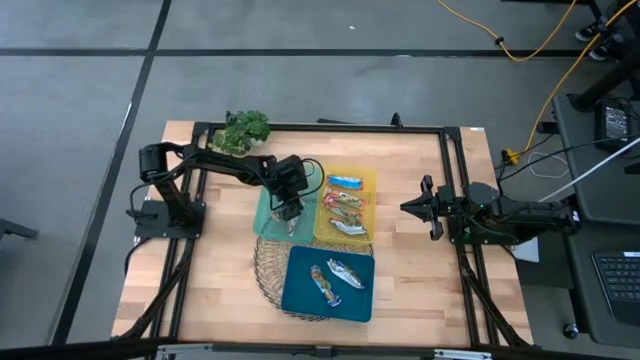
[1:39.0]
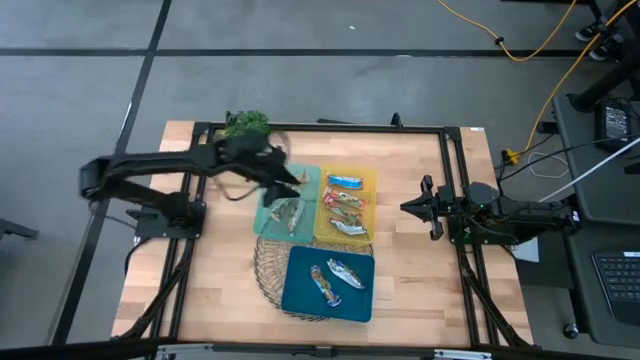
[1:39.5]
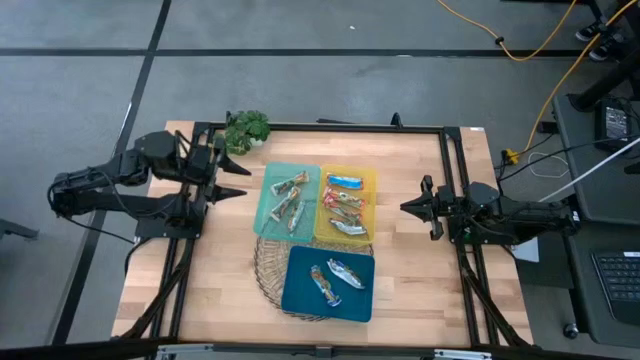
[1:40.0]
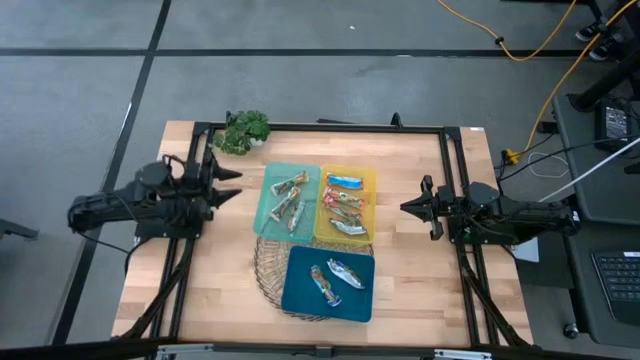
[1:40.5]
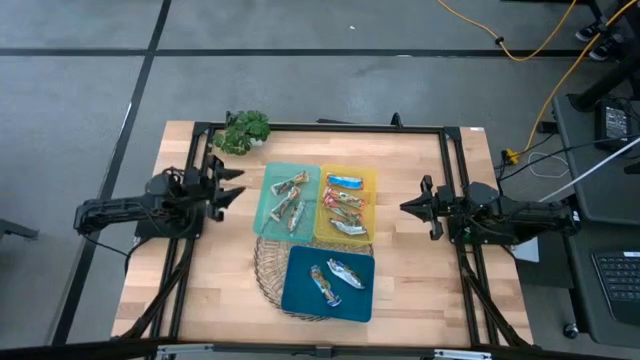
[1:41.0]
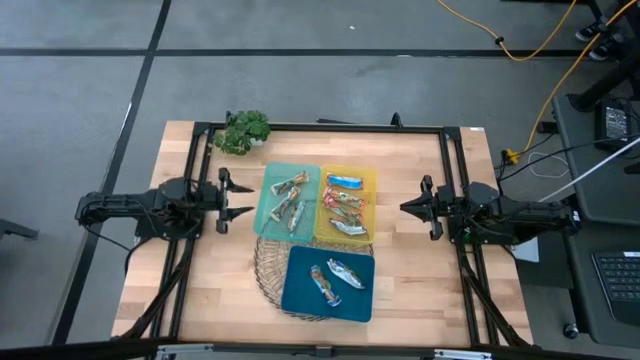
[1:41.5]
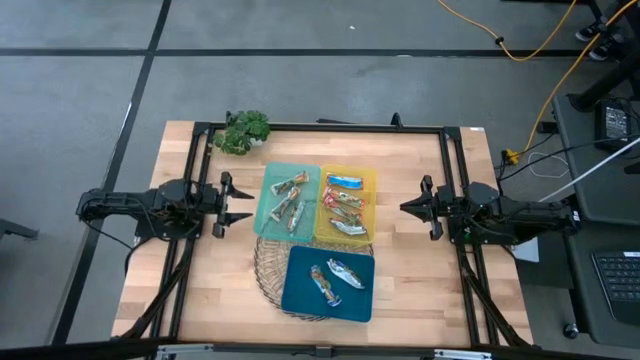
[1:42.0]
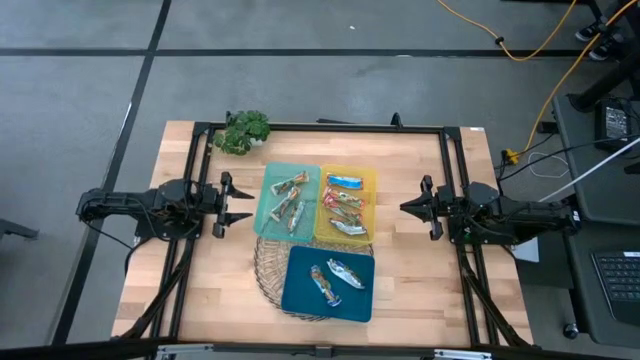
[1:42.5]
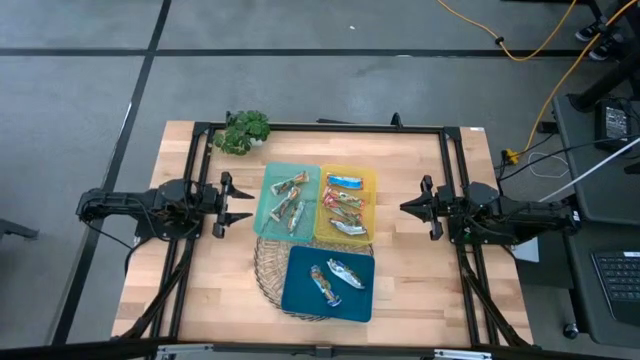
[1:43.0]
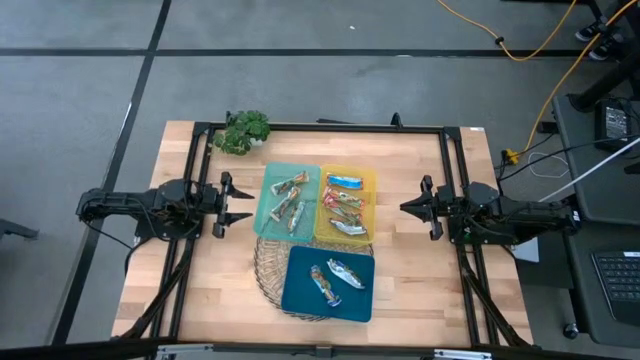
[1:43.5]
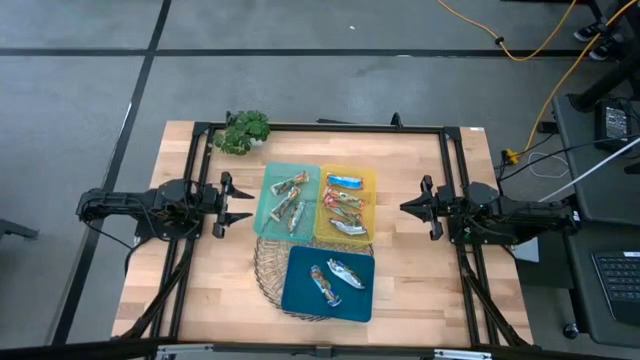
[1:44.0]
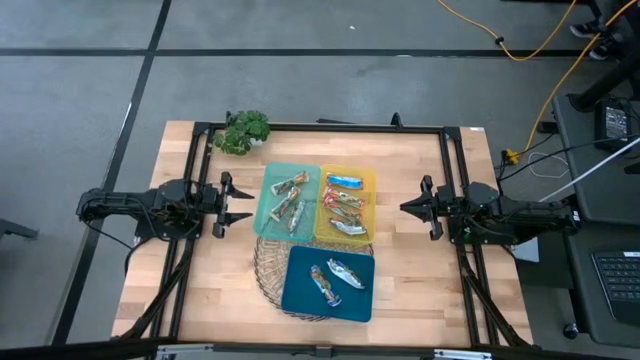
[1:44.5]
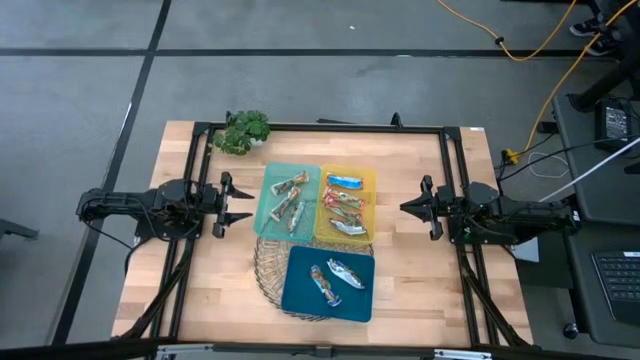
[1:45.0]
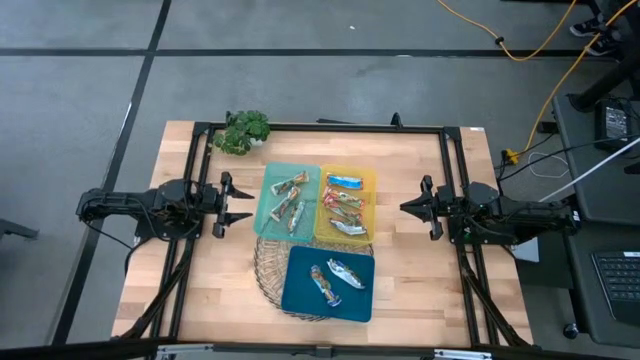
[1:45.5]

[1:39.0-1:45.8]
Task: Pick and place Granola Bars by type
Return to Home Position

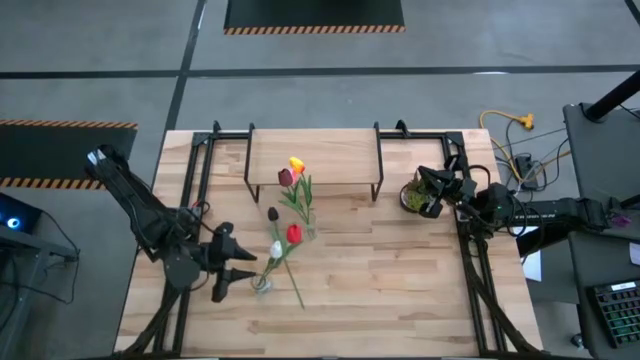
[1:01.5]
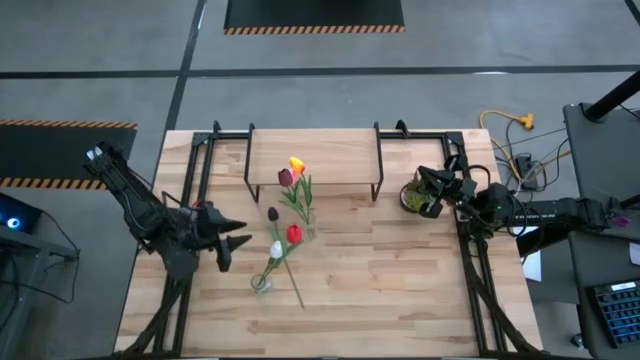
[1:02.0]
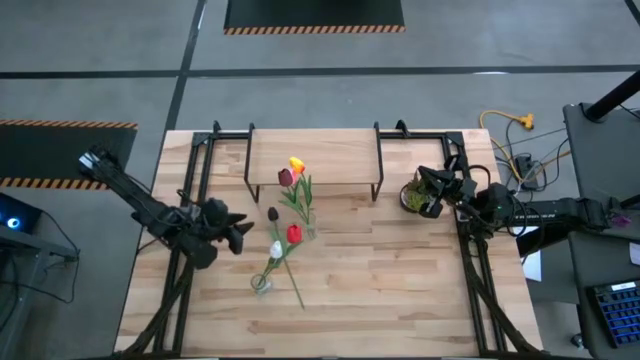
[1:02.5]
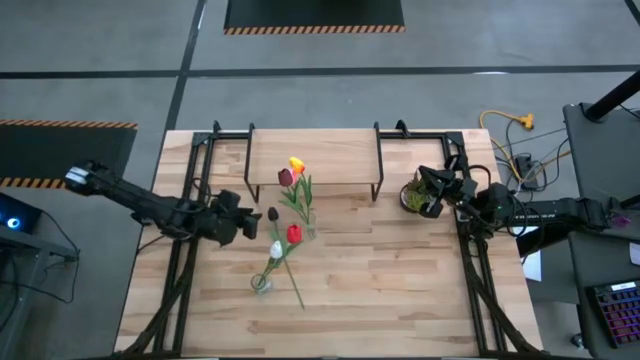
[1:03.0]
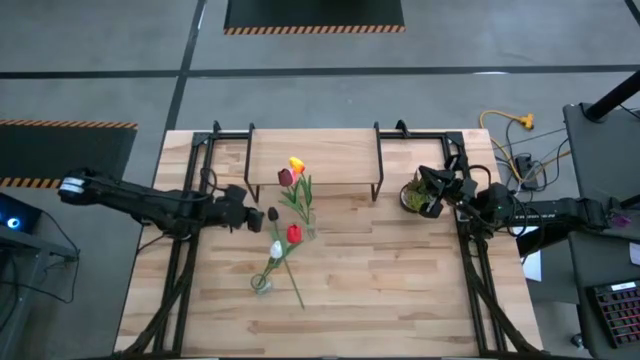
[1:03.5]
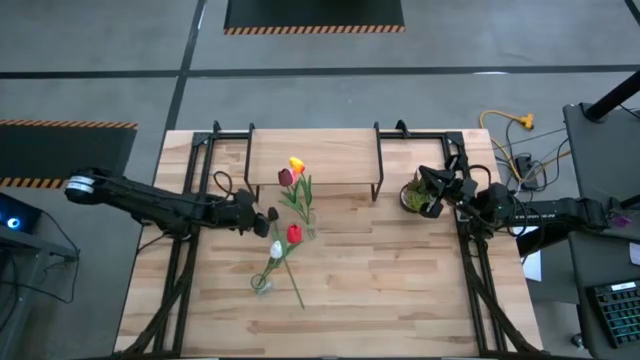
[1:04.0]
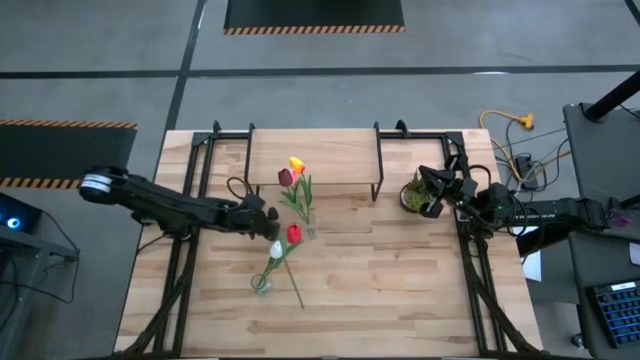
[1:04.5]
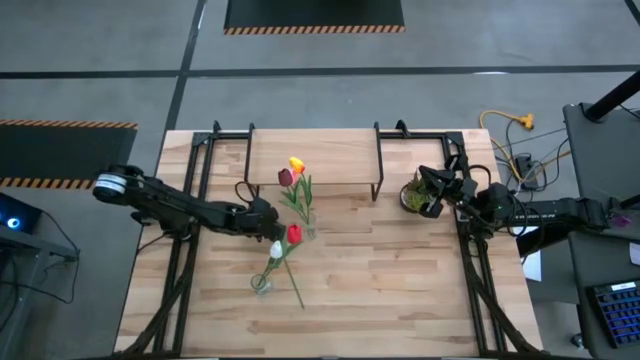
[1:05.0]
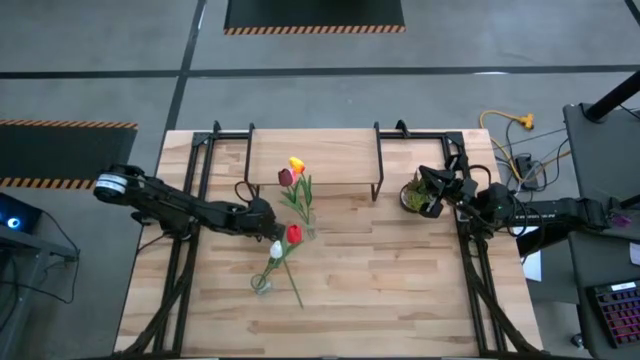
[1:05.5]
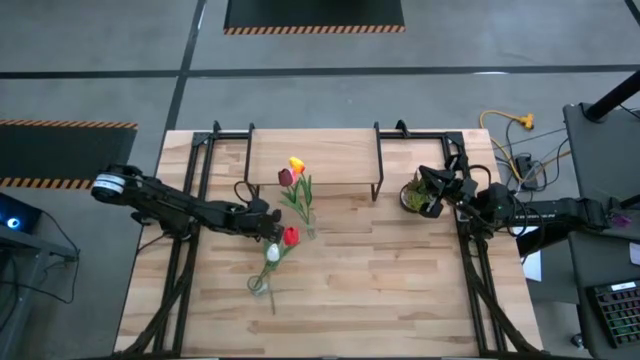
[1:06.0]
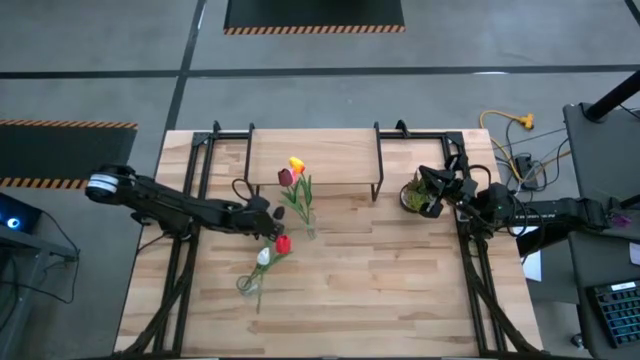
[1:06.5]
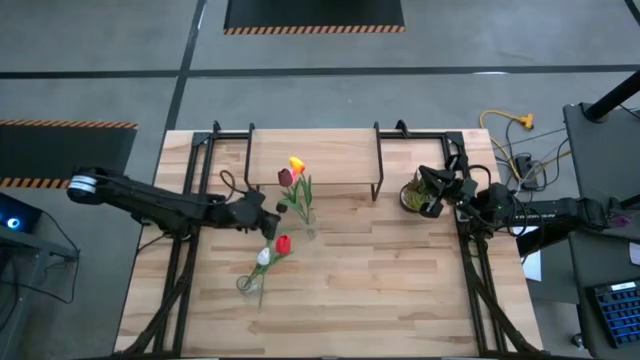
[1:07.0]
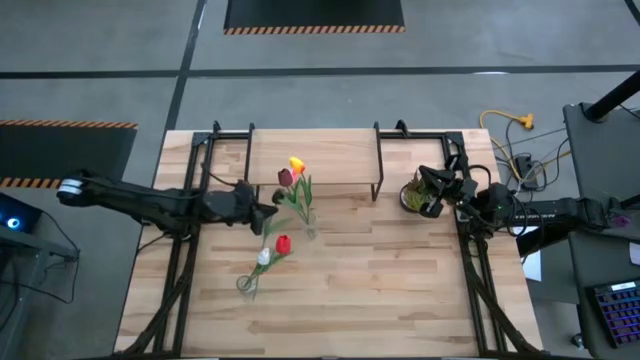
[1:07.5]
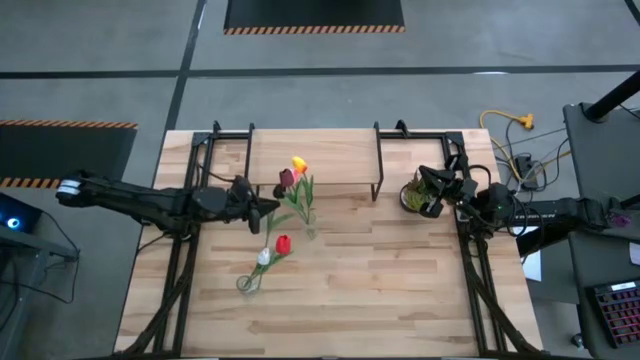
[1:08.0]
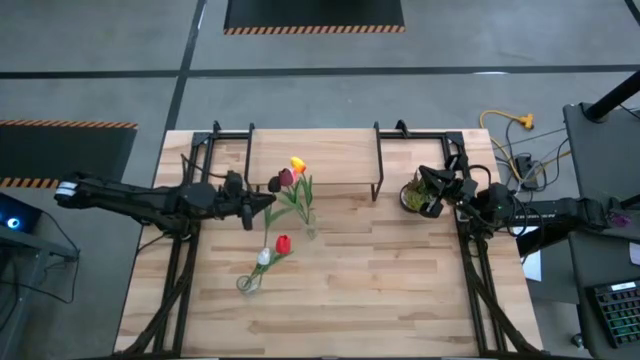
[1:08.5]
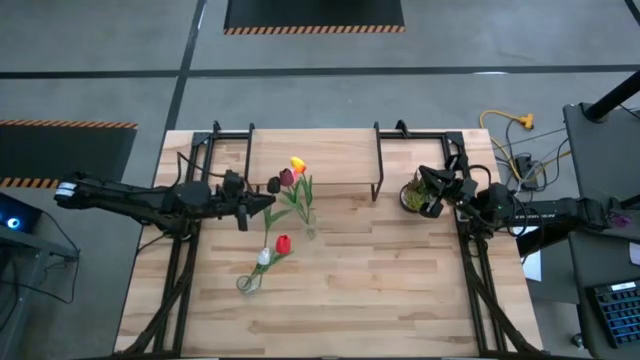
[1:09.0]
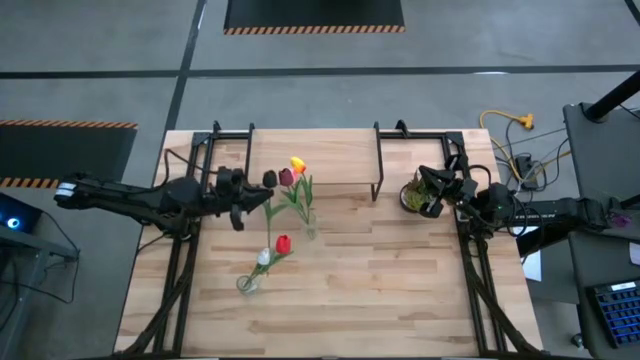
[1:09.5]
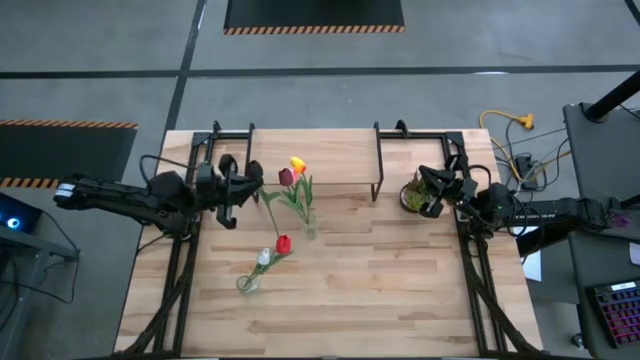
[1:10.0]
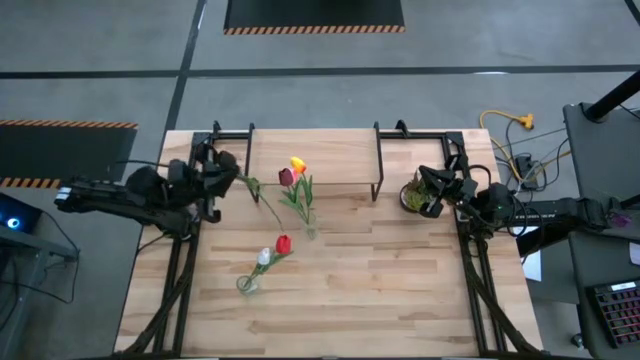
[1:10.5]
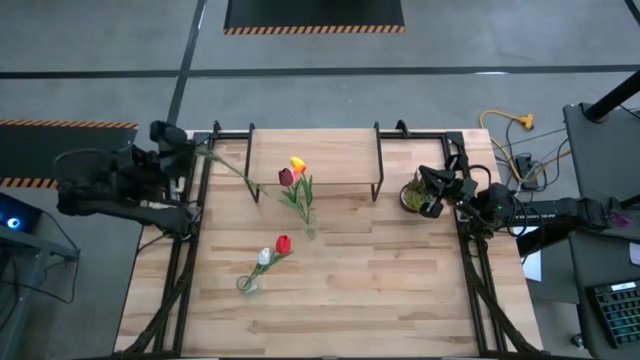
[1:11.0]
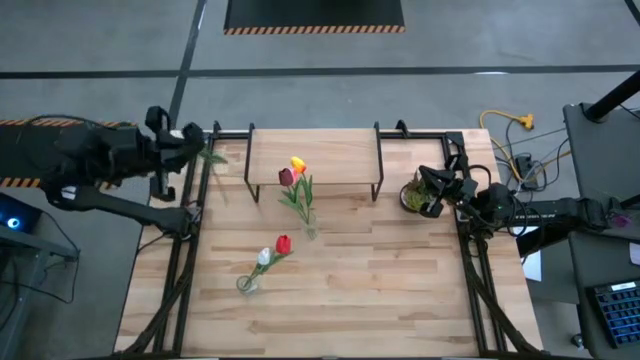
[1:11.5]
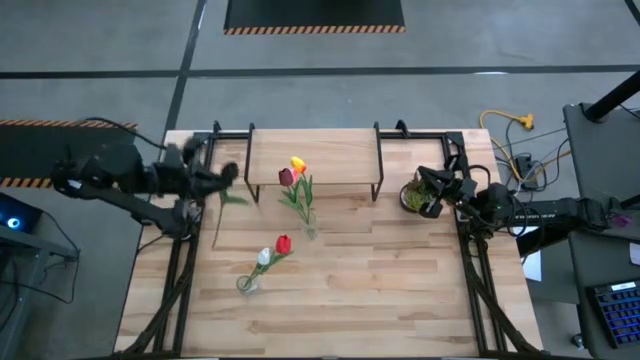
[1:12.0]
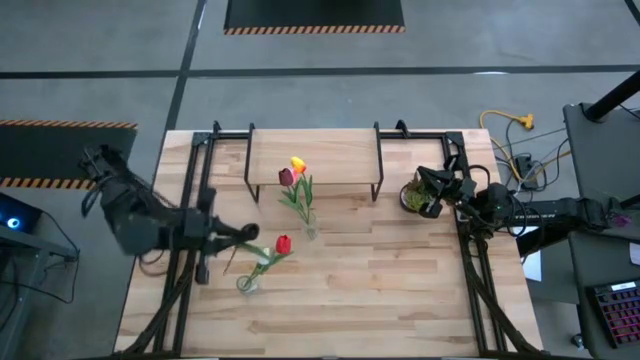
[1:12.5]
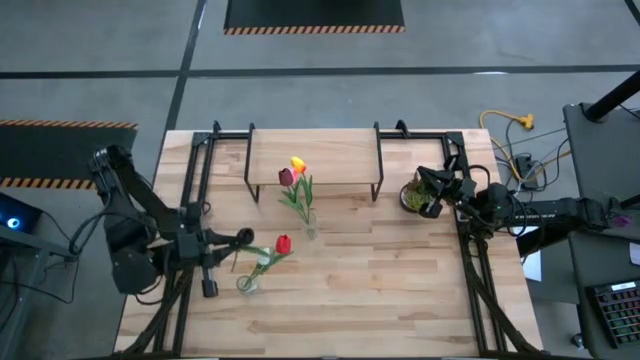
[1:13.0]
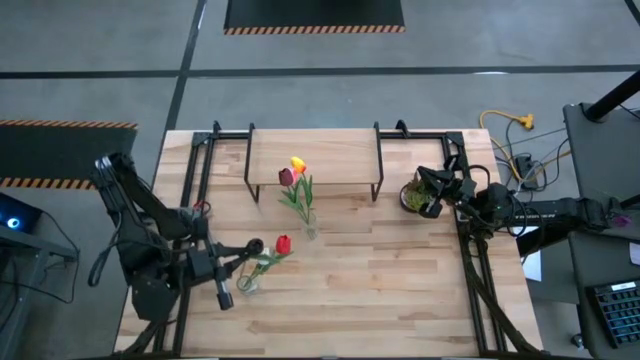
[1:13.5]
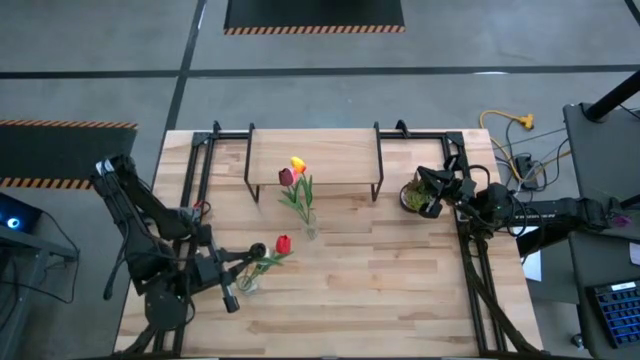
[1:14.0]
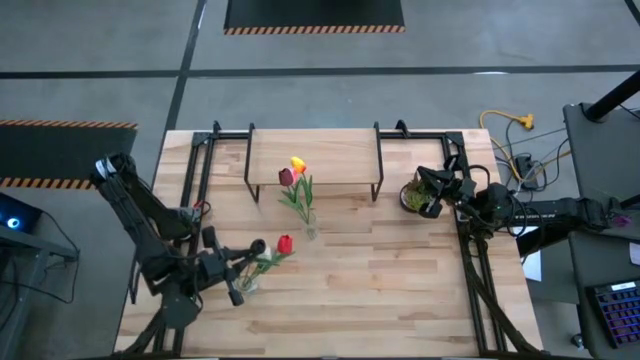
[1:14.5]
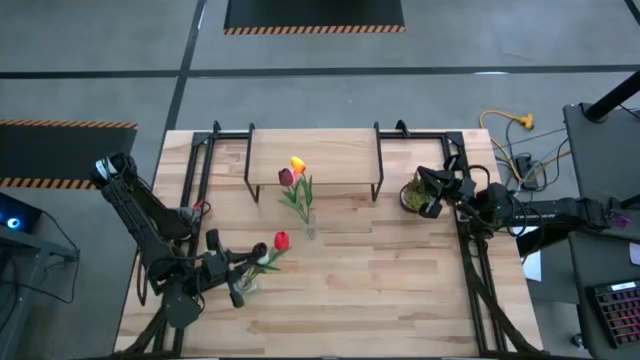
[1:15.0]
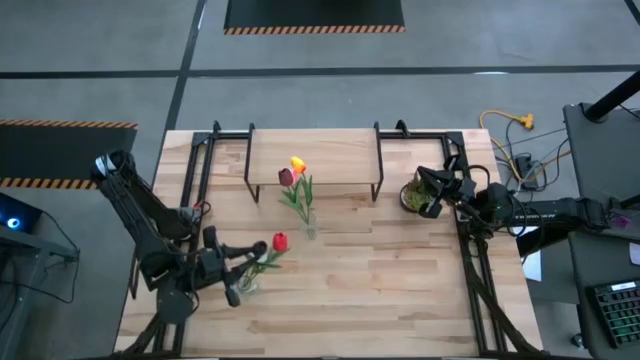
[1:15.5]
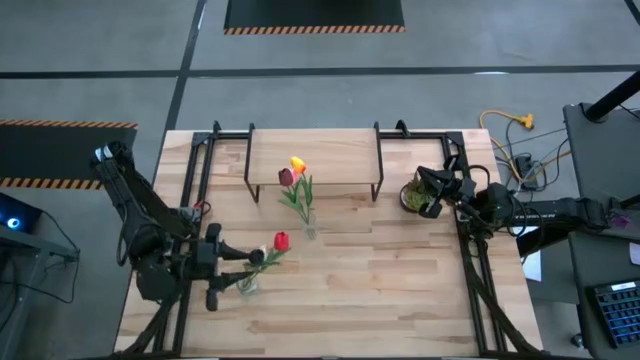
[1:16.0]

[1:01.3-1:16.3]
Task: Pick and place flowers into a vace then onto a shelf
Put the black flower into the bottom transparent vase
